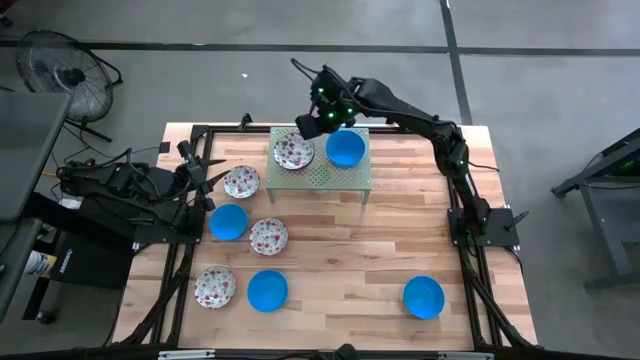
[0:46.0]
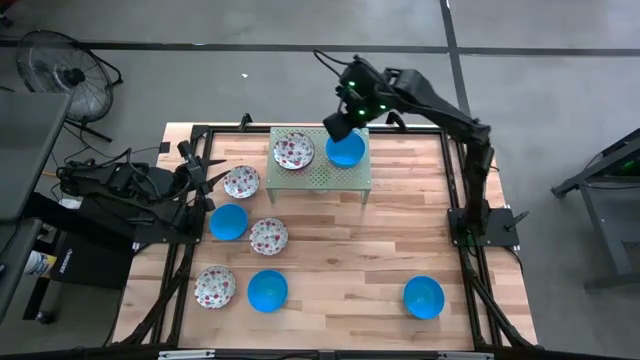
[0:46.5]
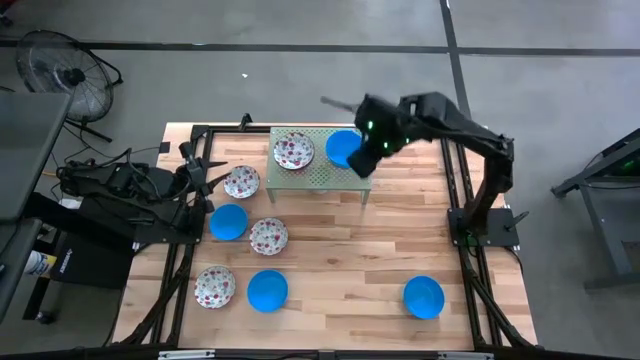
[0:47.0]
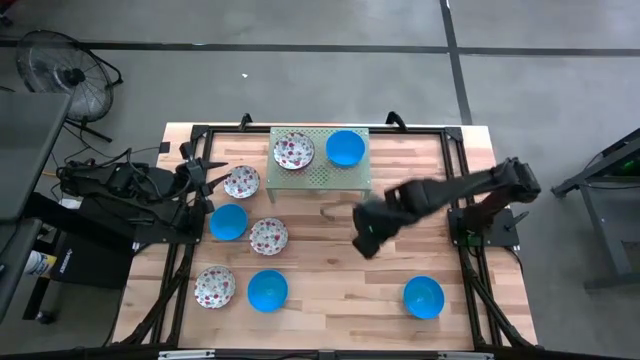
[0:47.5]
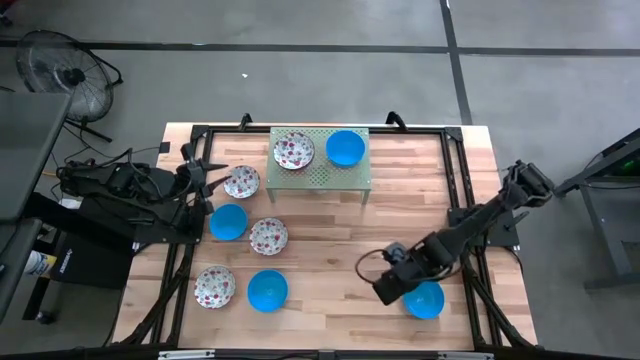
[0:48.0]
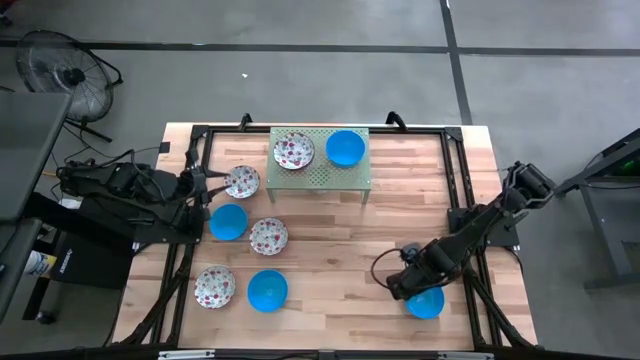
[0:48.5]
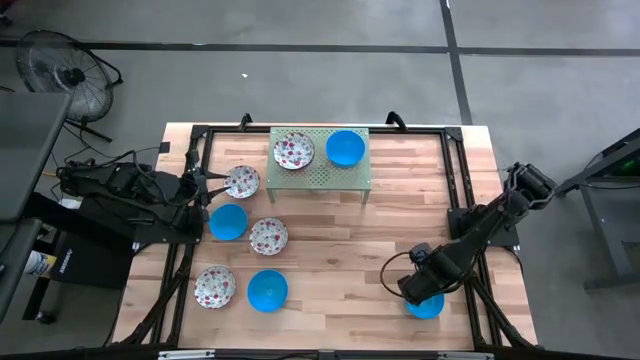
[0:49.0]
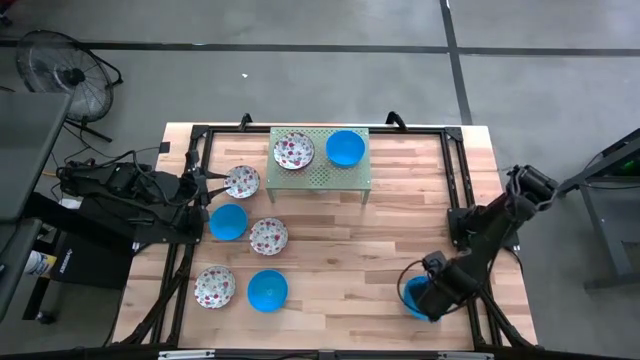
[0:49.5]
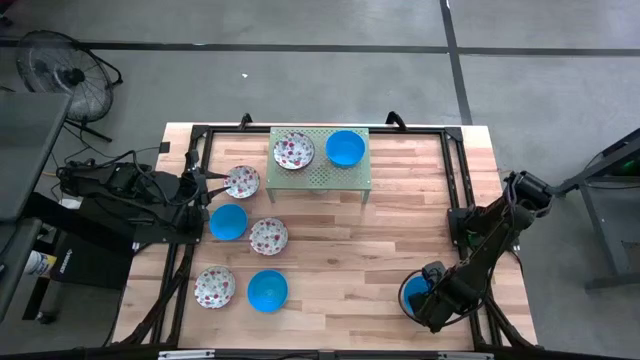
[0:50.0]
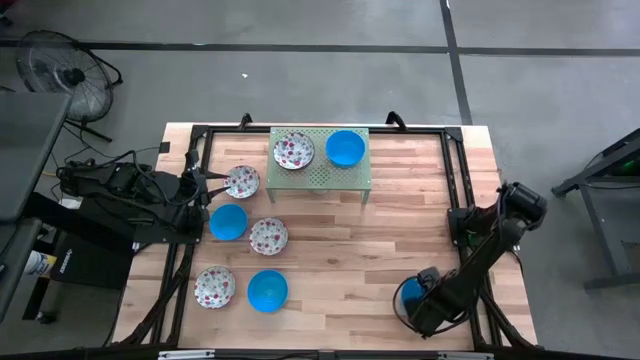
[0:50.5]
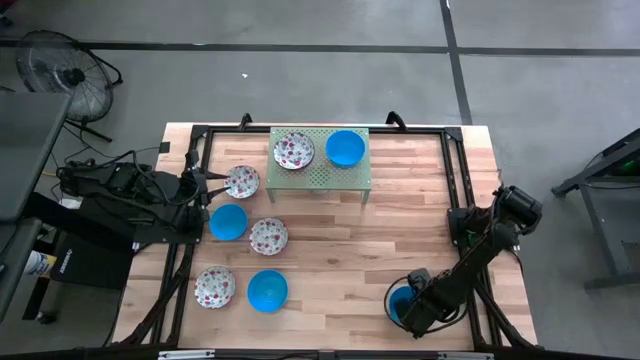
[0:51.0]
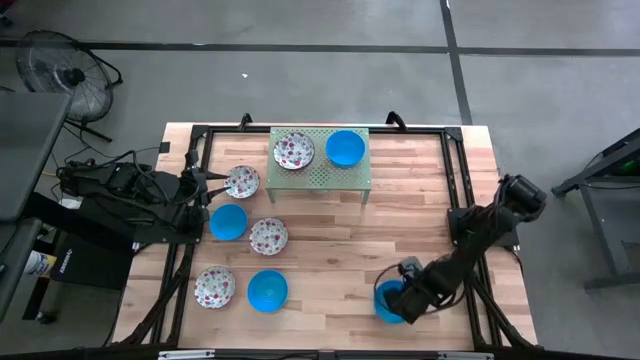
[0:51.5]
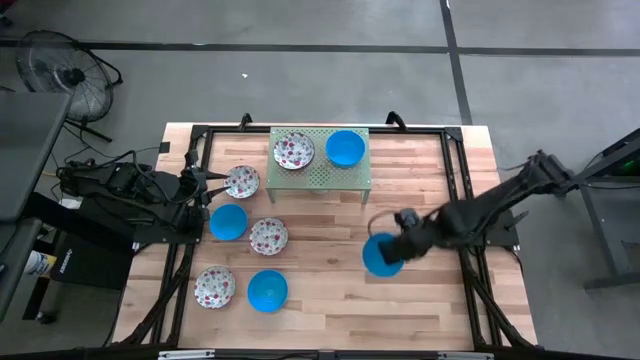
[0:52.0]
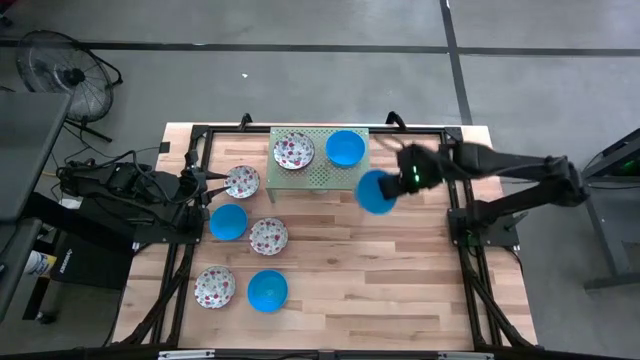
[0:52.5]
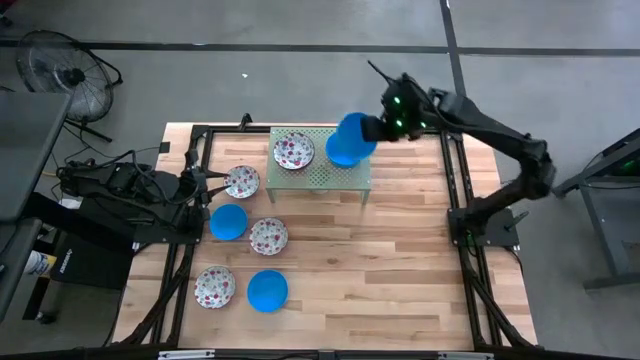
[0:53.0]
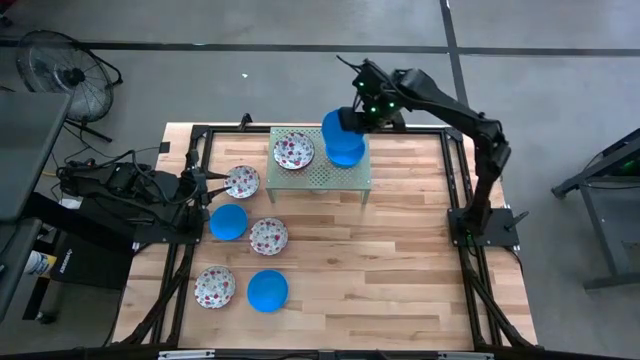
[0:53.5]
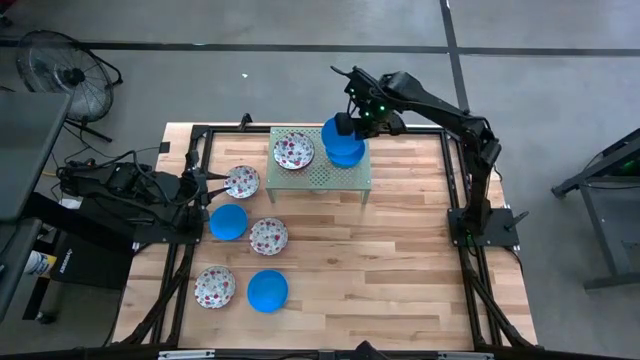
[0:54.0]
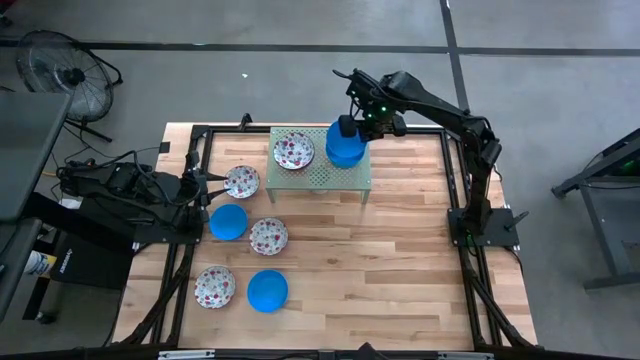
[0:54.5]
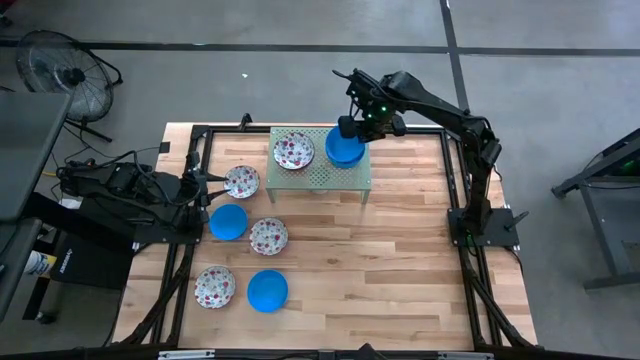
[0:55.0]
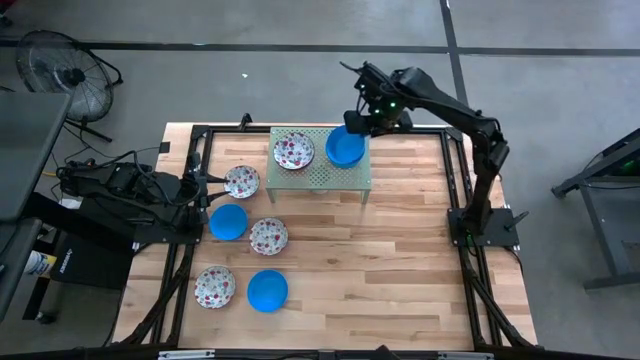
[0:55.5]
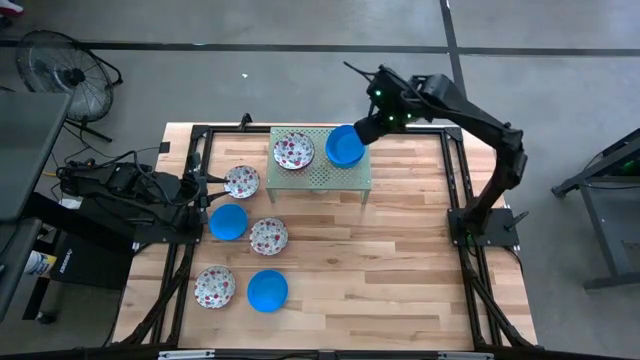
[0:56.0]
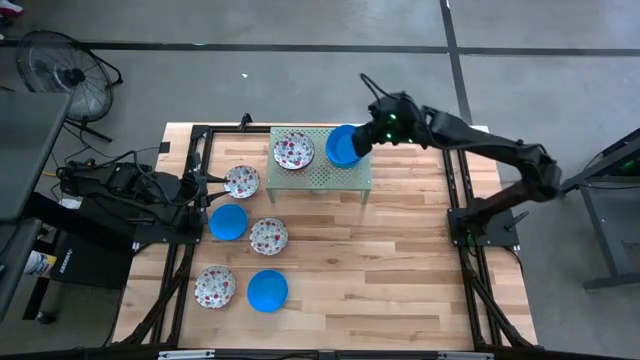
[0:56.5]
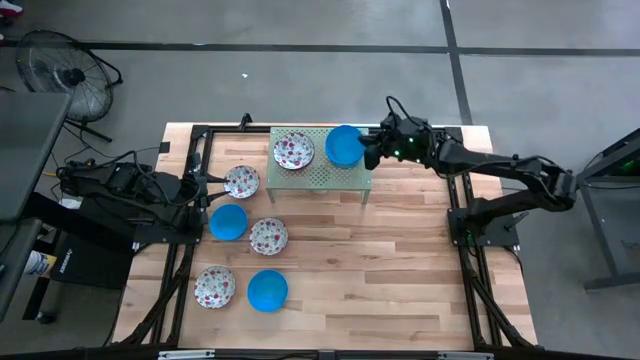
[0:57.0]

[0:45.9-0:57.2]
Task: Pick & Place Mini bowls
Stack the blue bowl on the blue bowl on the shelf

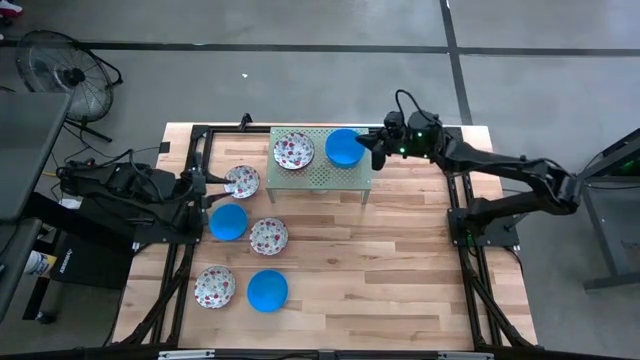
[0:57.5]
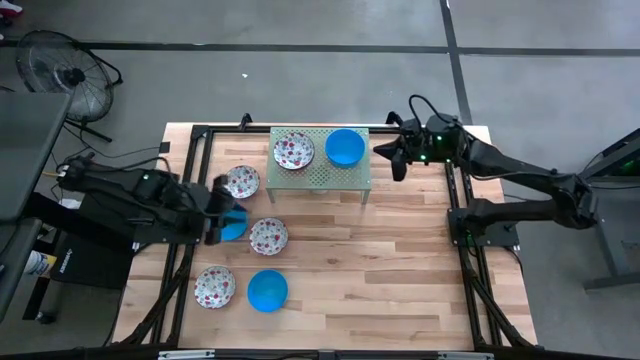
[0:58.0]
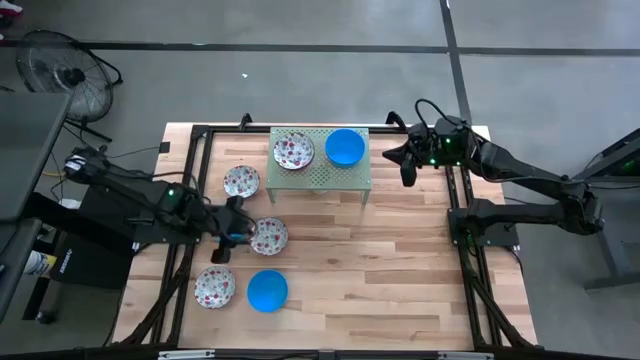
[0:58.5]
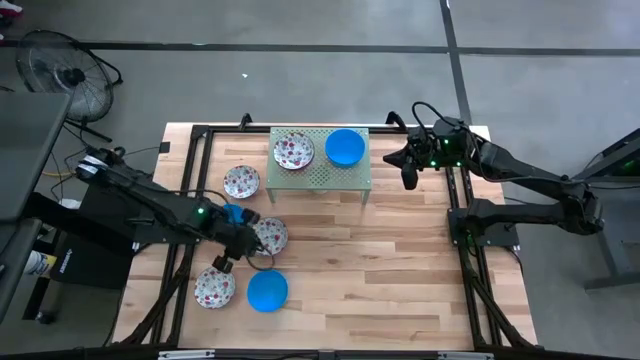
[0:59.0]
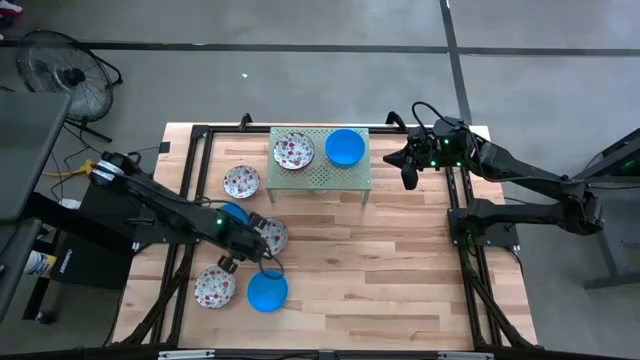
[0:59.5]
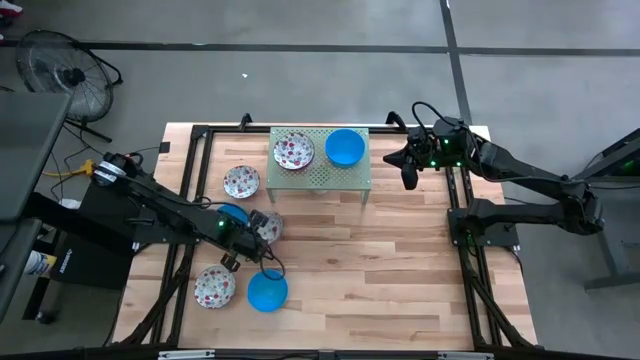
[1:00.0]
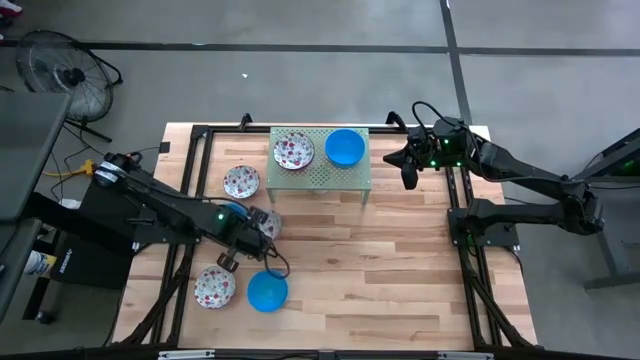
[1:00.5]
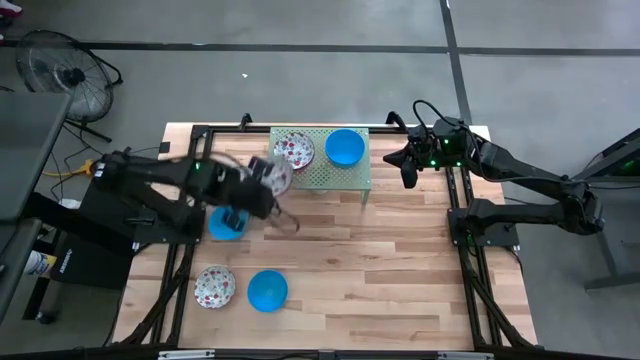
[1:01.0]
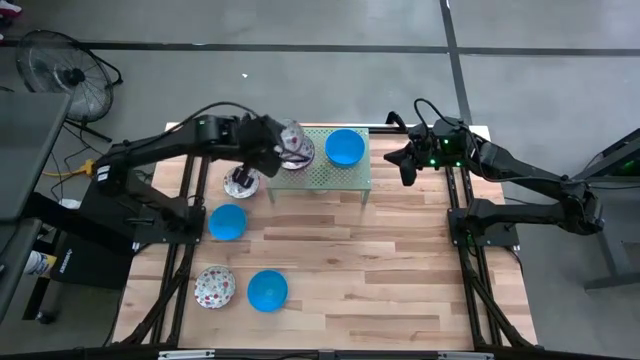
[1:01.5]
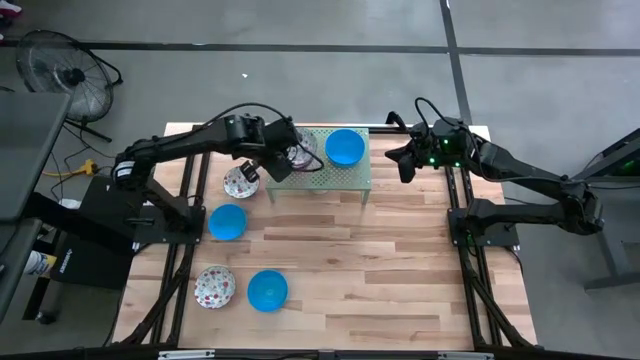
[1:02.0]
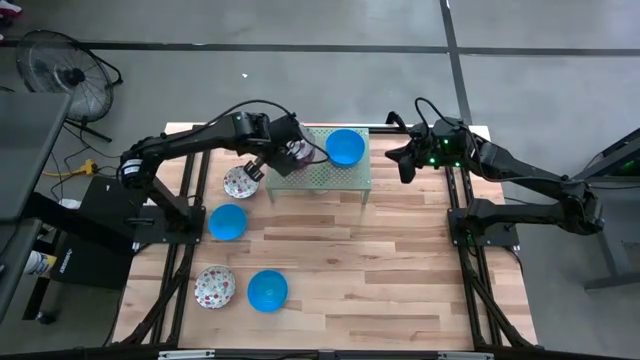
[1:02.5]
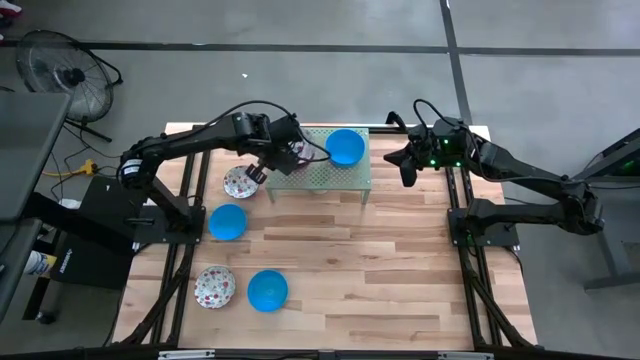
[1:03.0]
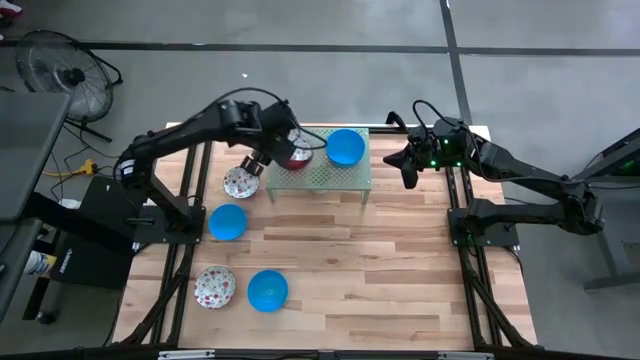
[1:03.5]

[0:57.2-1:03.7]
Stack the red patterned bowl on the red patterned bowl on the shelf

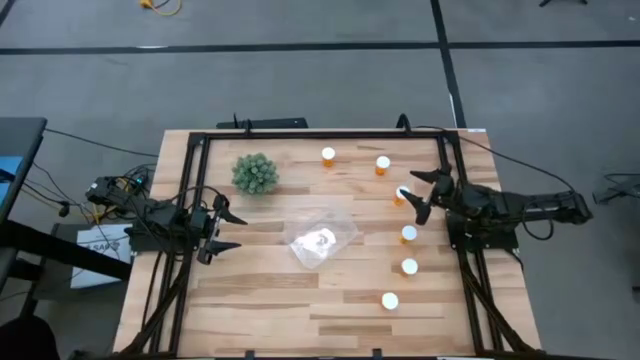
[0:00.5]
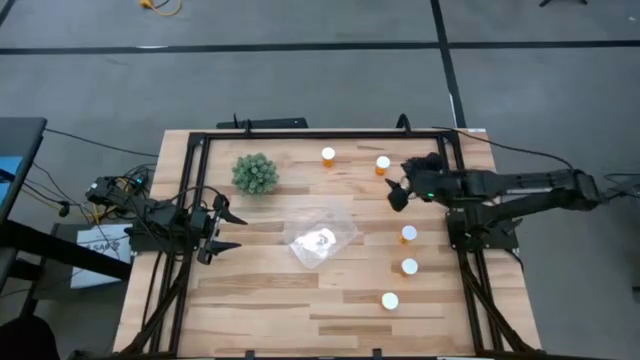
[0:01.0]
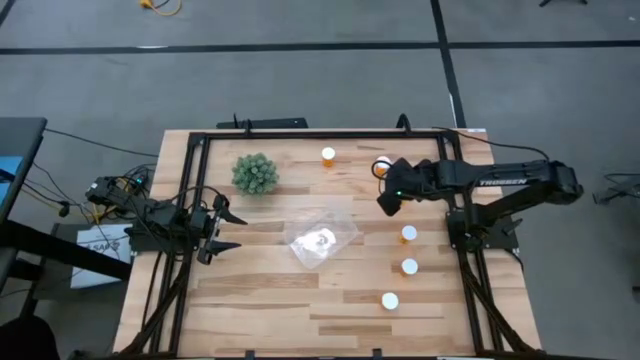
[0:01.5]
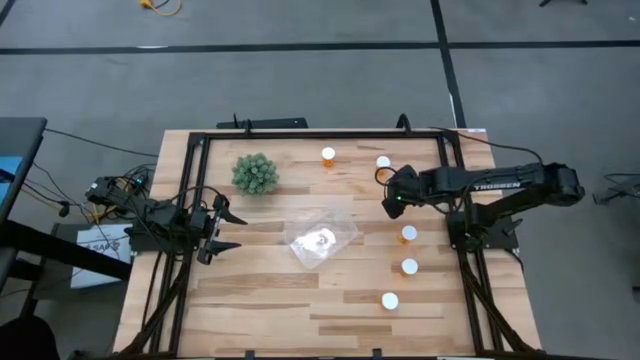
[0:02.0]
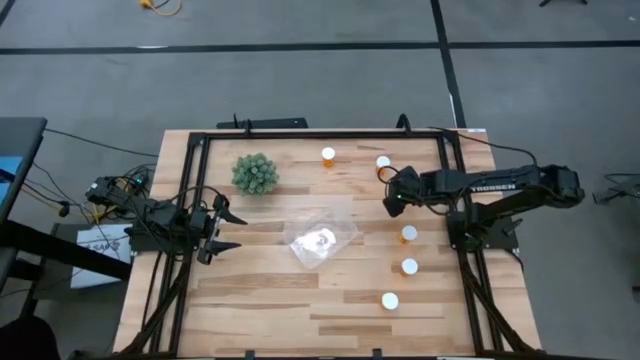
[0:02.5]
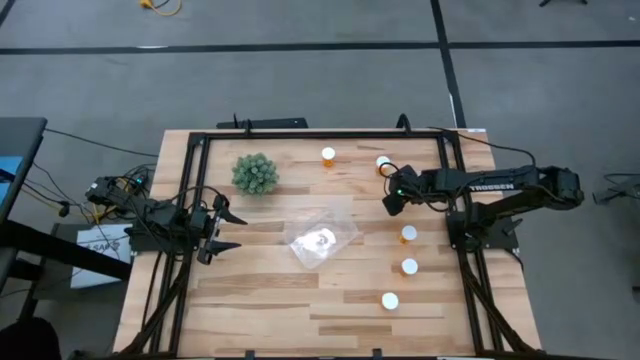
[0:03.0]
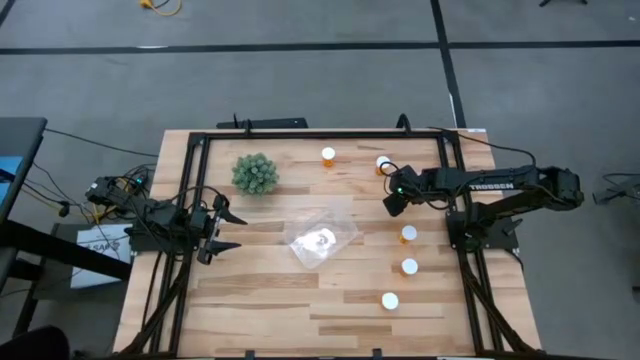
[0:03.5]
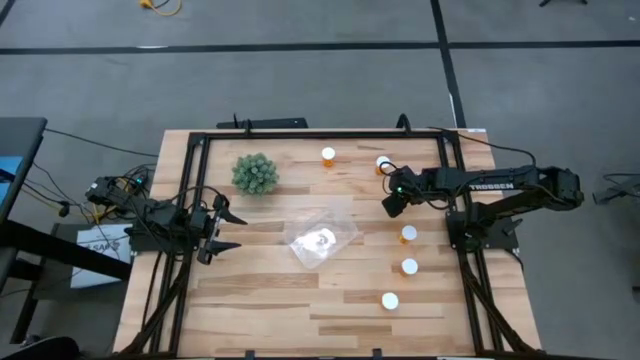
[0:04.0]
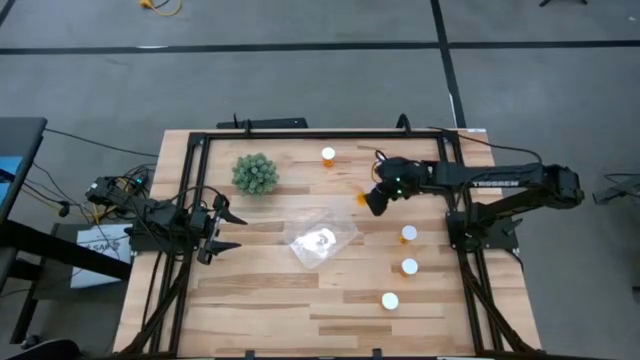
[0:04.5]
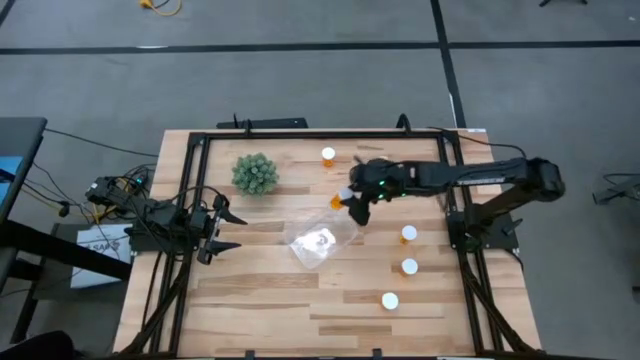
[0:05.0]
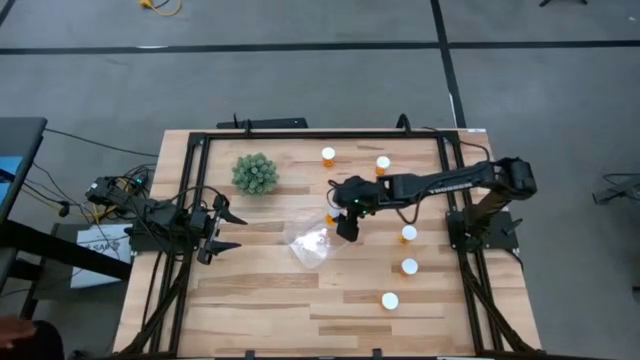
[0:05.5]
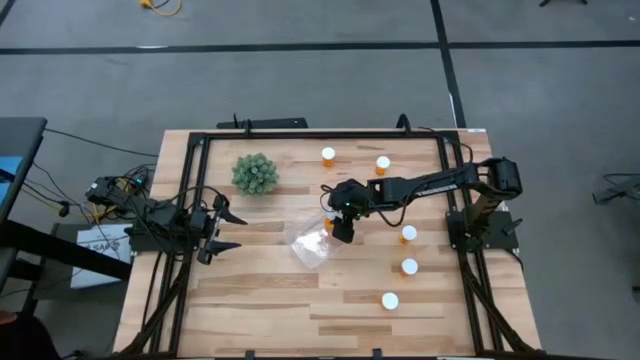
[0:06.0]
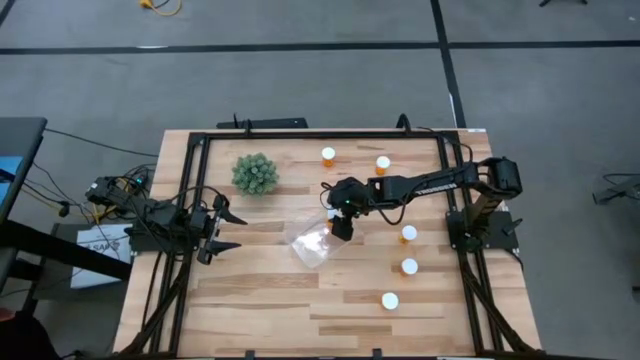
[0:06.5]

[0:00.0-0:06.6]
Task: Pick and place pill bottles into a basket
Put the orange medicine bottle into the transparent bin
